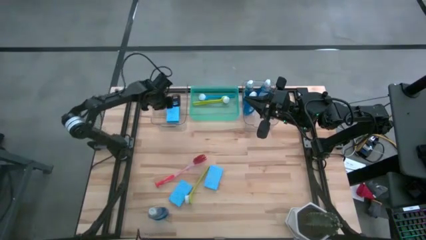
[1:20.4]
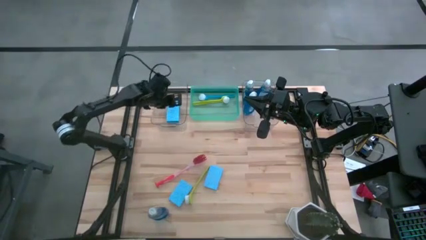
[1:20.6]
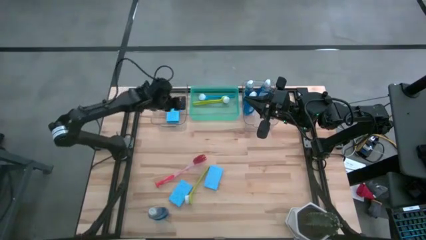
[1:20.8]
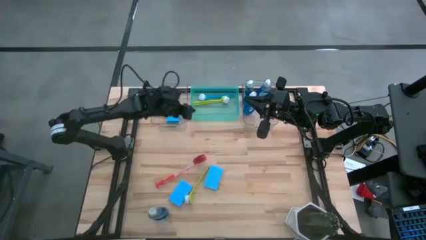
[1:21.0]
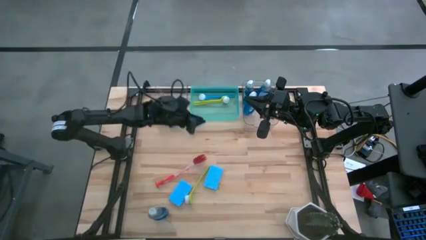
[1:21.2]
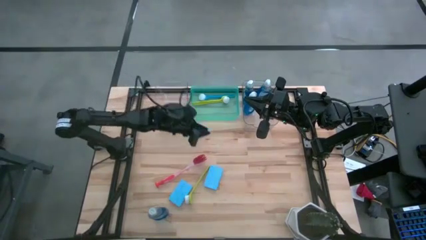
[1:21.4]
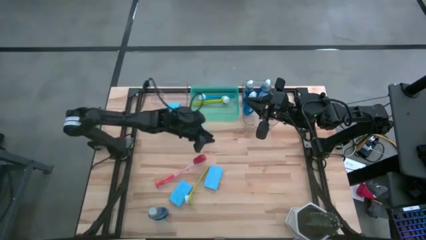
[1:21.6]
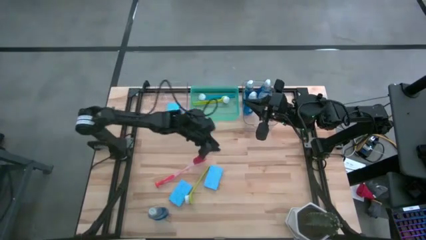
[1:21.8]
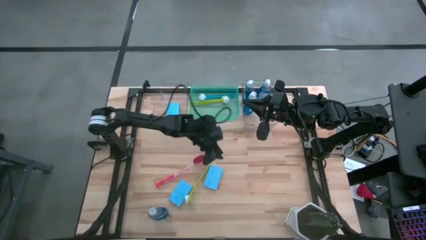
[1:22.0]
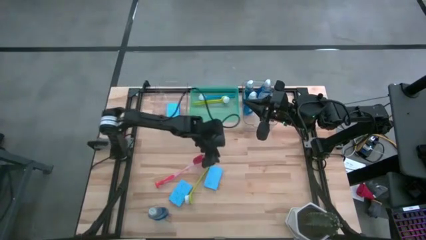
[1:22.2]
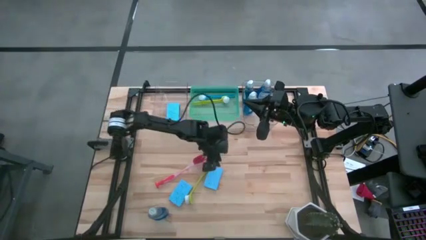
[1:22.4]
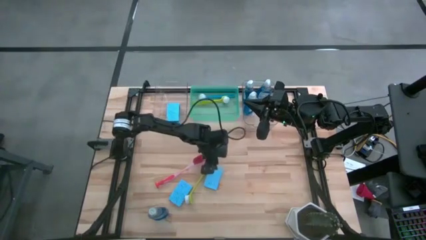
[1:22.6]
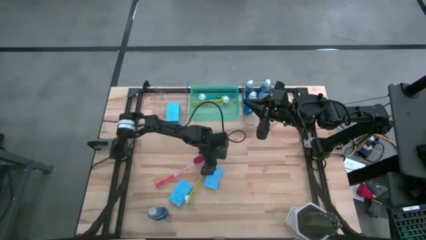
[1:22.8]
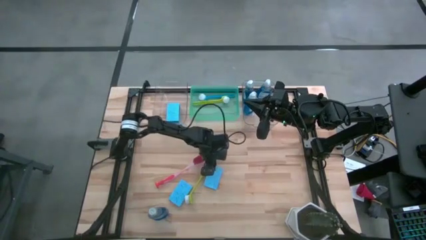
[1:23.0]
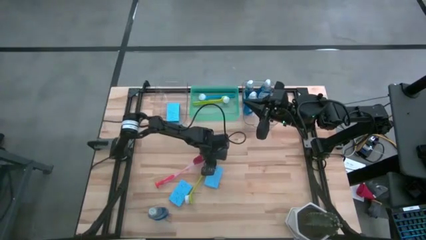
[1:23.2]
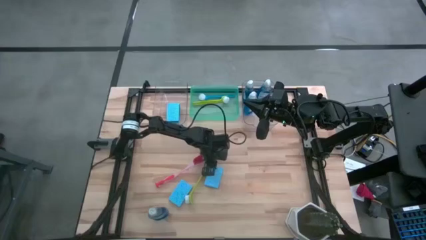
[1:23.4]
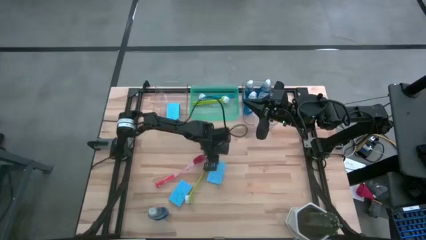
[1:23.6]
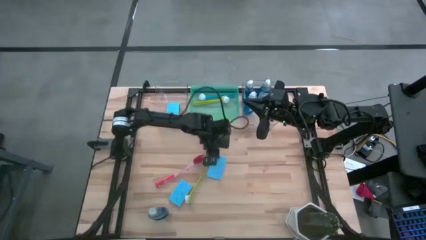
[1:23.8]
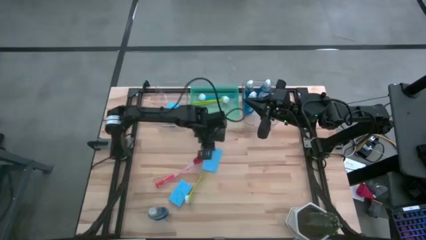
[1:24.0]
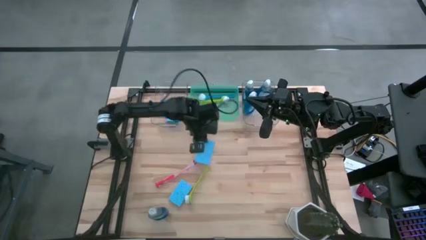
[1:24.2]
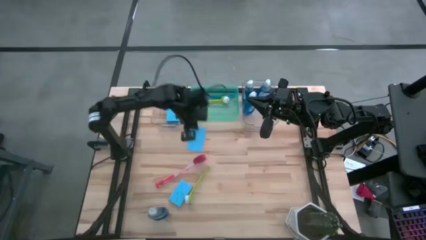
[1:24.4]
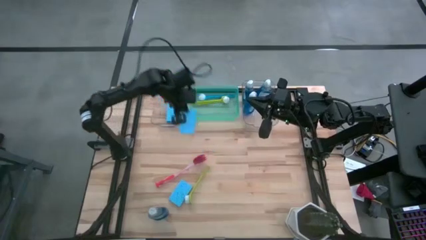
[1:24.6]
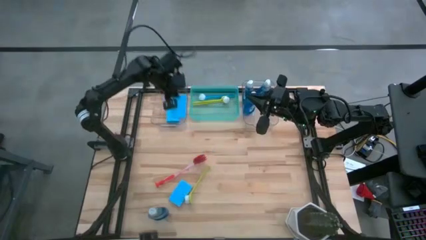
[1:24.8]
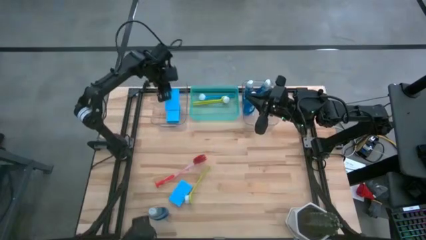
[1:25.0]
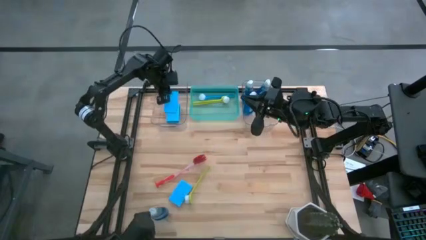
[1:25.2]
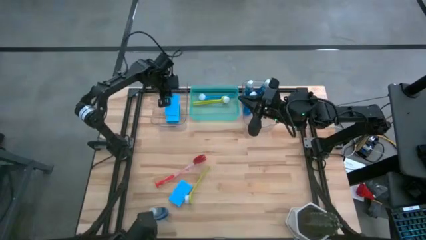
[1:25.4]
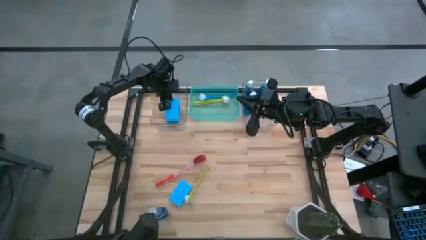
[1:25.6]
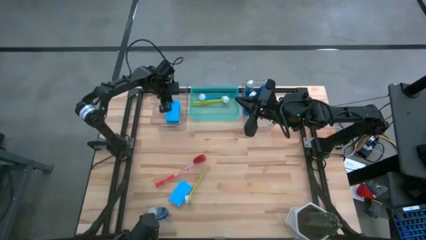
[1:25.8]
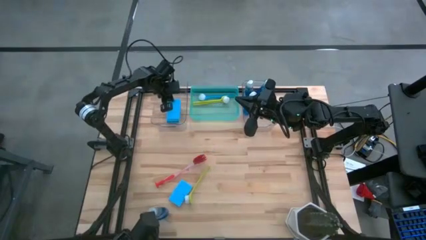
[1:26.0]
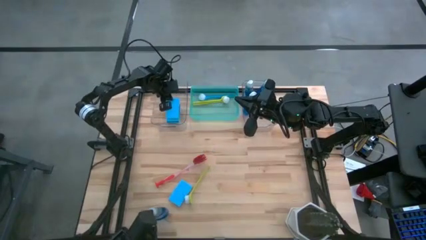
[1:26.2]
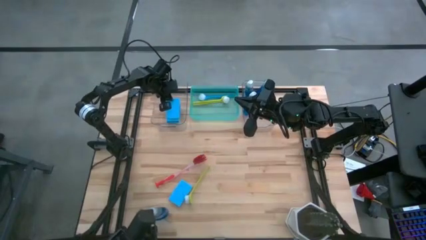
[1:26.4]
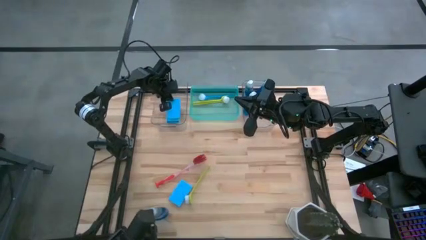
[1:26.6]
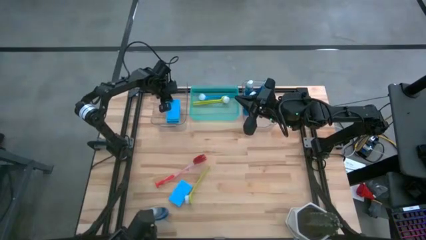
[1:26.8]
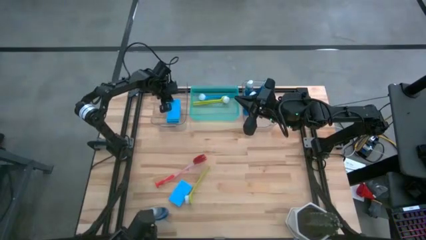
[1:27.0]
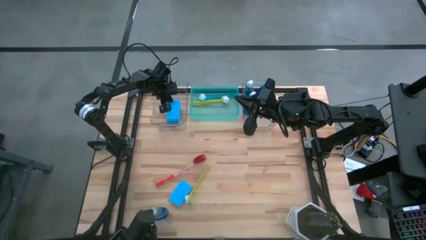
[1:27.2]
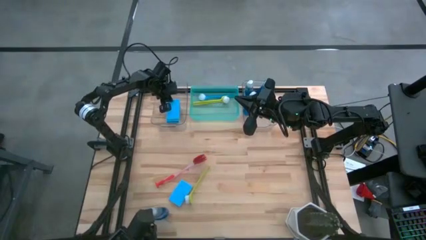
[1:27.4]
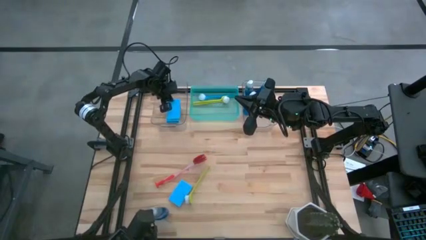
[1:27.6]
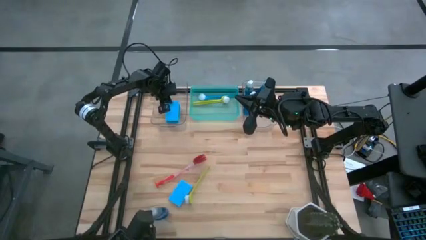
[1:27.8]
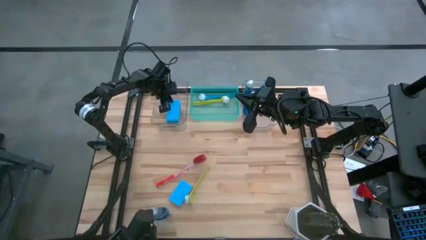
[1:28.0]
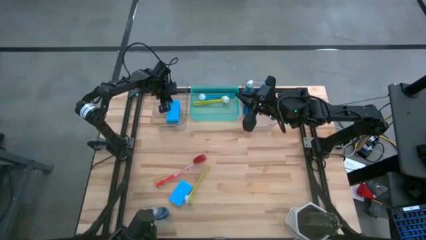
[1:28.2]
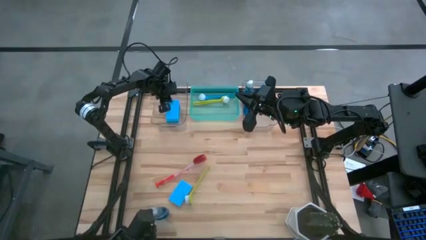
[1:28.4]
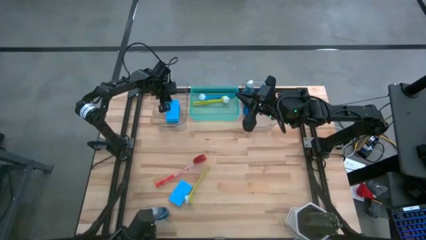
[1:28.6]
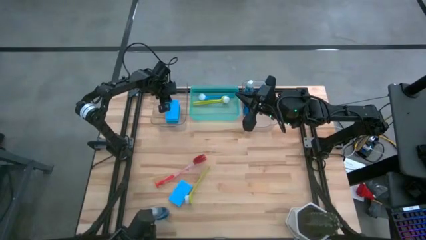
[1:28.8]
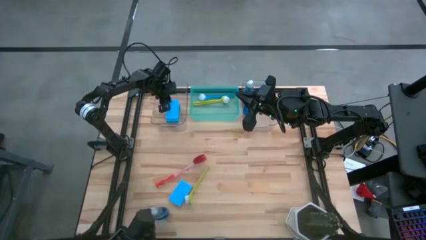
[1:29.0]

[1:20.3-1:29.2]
Task: Pick & Place Kitchen Sink Supplies
Put the blue sponge wipe into the left transparent bin

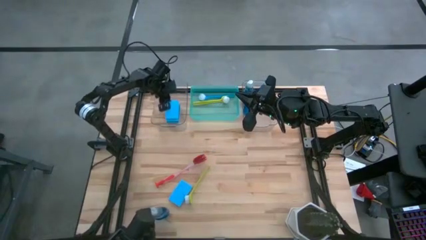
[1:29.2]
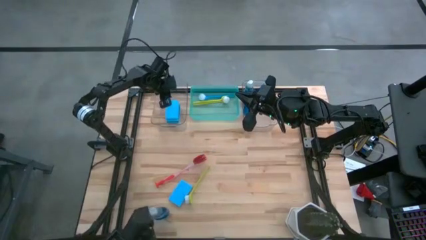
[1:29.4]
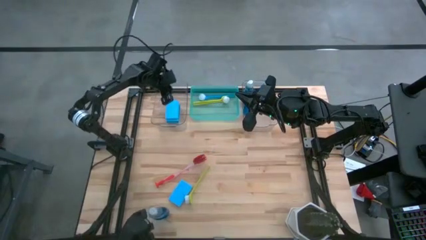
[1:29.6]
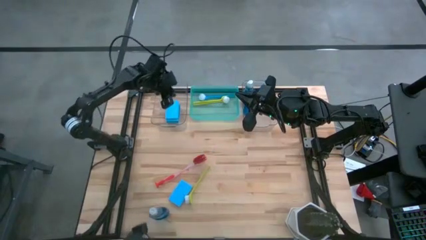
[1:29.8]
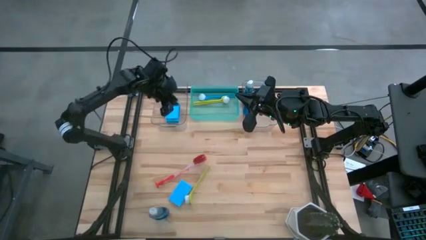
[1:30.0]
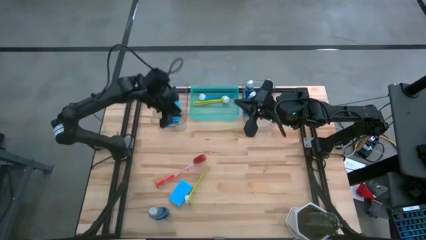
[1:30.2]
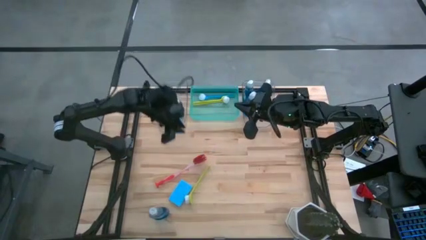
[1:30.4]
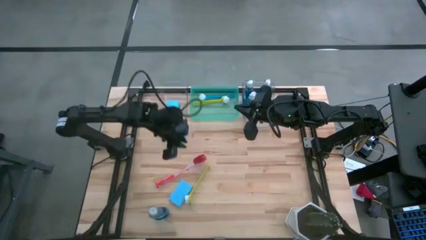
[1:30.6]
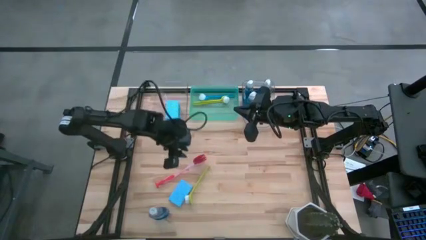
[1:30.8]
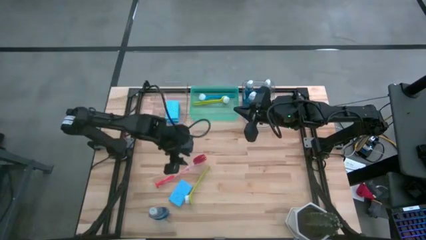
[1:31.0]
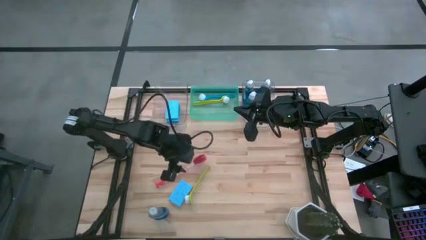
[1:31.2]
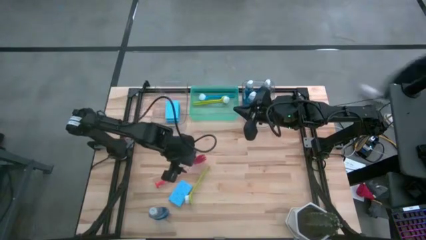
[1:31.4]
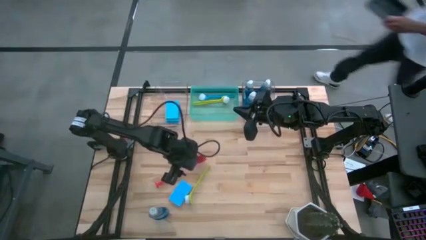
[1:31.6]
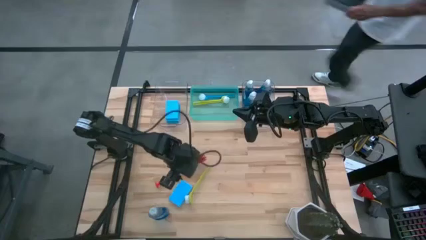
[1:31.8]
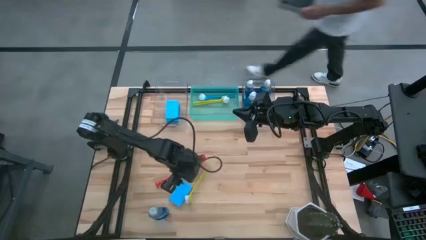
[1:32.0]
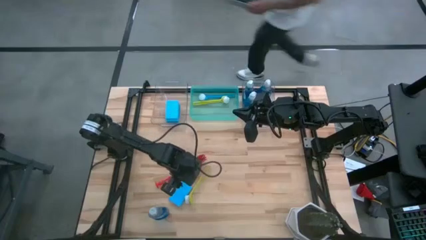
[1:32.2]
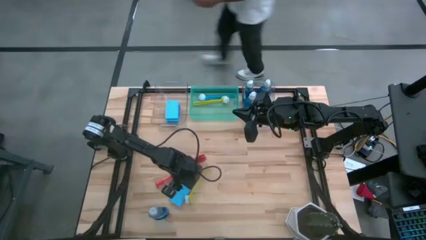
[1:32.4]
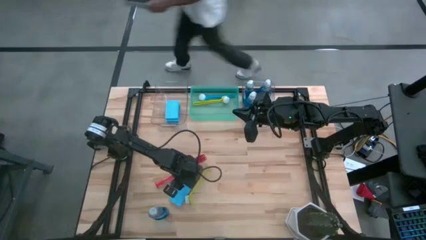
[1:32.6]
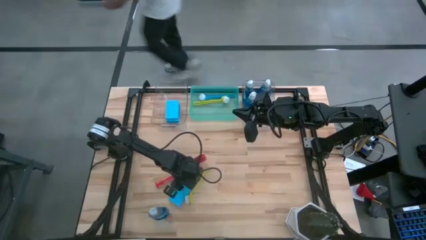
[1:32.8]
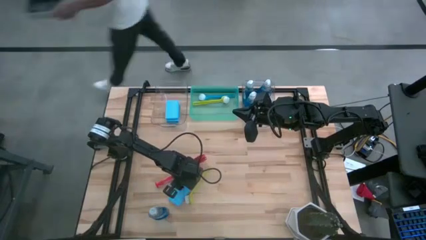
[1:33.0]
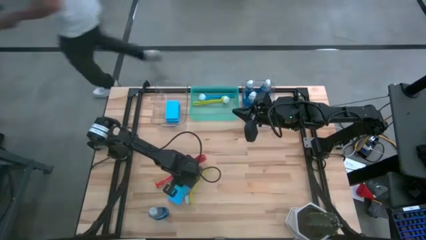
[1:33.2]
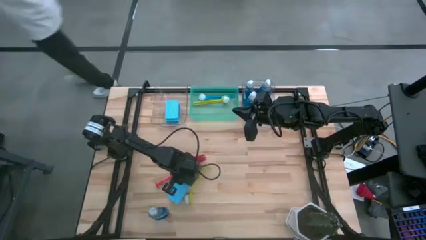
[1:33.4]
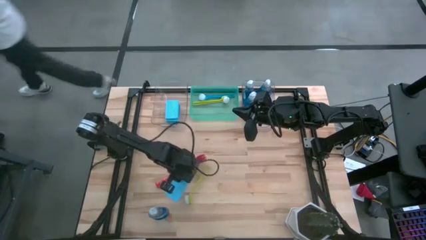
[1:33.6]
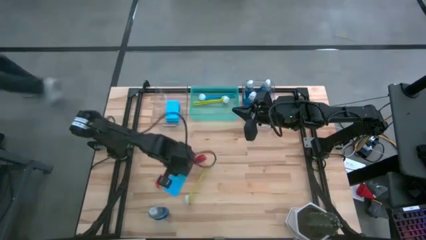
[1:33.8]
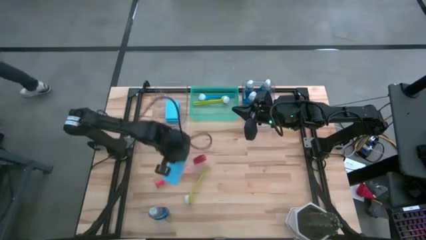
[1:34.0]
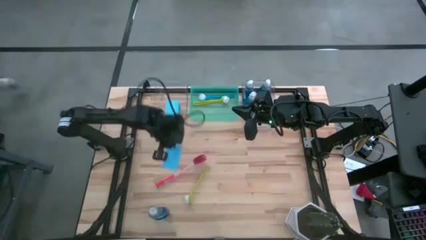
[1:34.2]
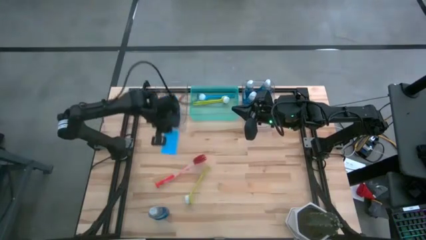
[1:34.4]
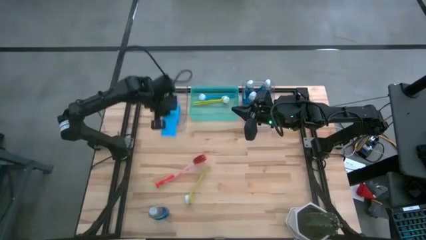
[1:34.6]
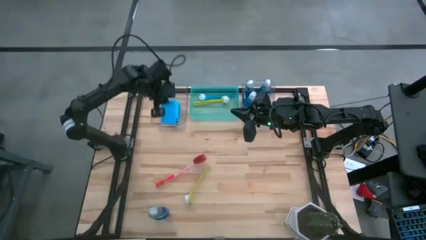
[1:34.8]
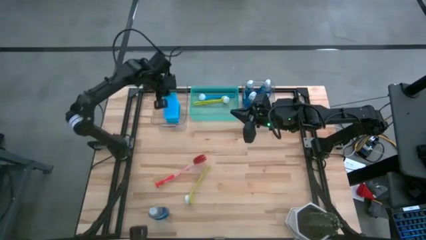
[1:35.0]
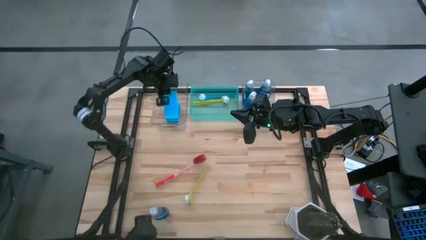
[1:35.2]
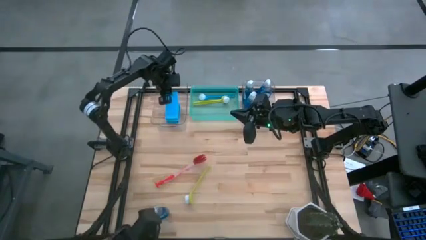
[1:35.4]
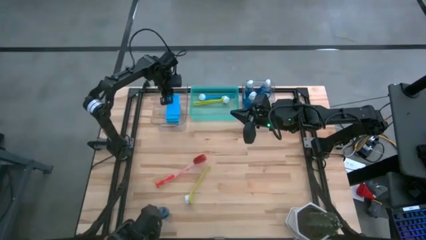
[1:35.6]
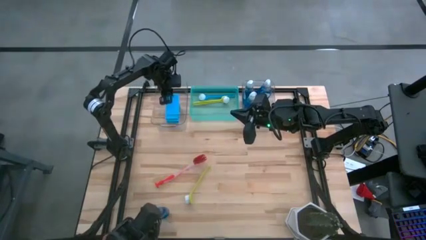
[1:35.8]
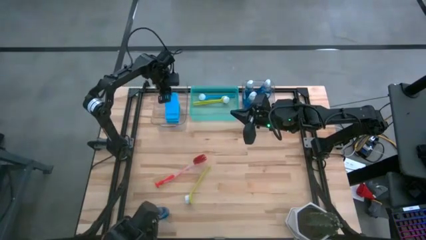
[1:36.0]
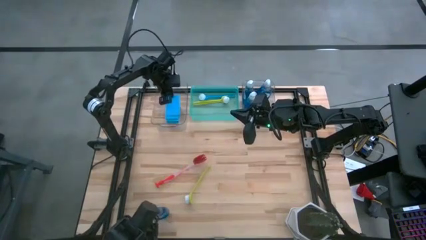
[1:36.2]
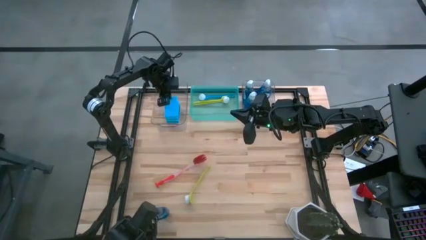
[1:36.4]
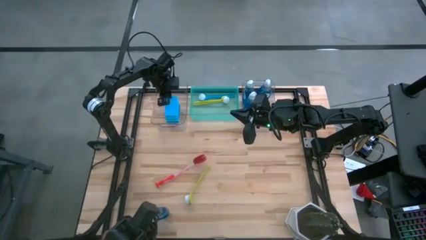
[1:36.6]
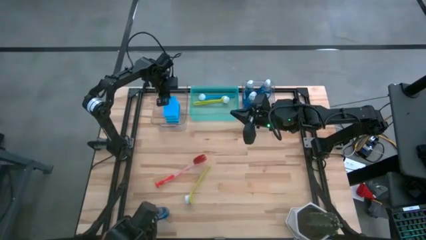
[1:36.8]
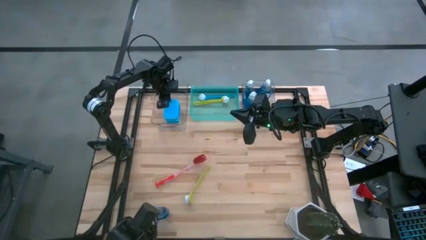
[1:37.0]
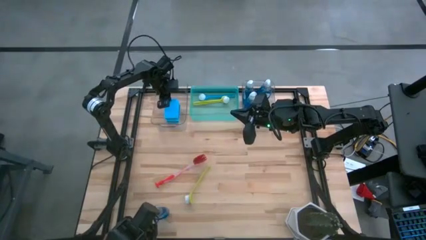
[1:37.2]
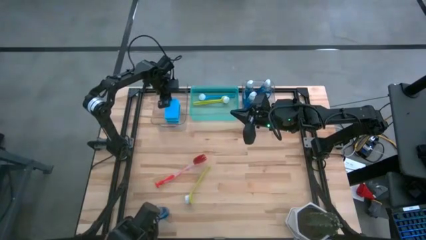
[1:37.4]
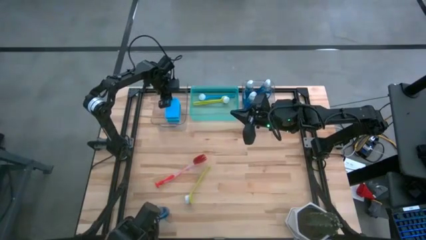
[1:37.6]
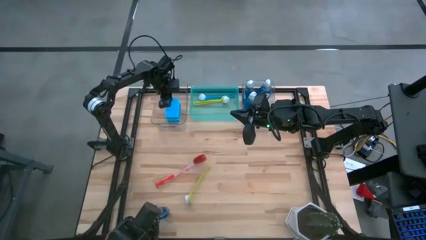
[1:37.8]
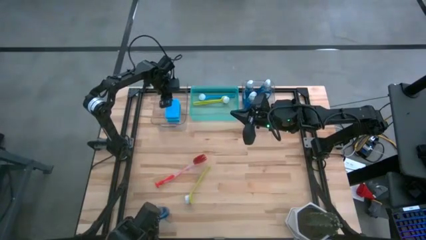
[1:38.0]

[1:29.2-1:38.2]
Put the blue sponge wipe into the left transparent bin
